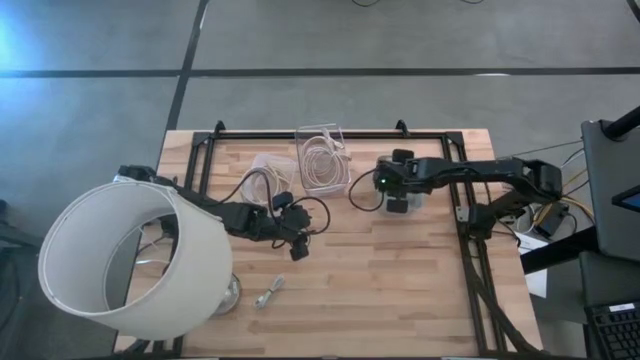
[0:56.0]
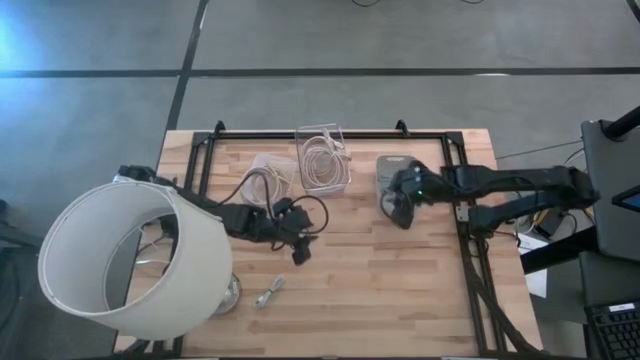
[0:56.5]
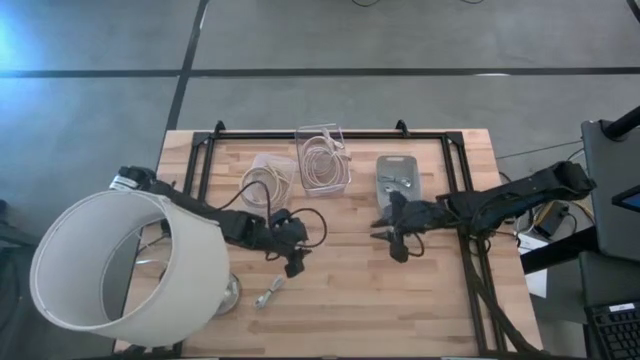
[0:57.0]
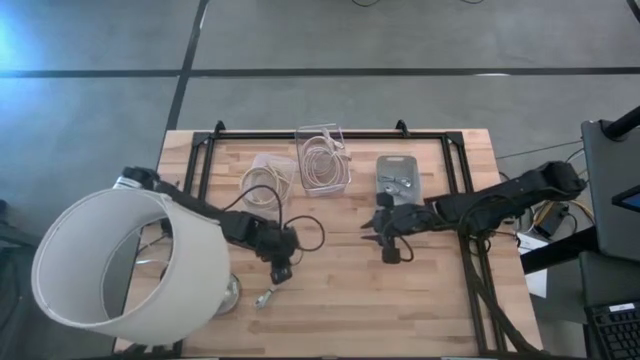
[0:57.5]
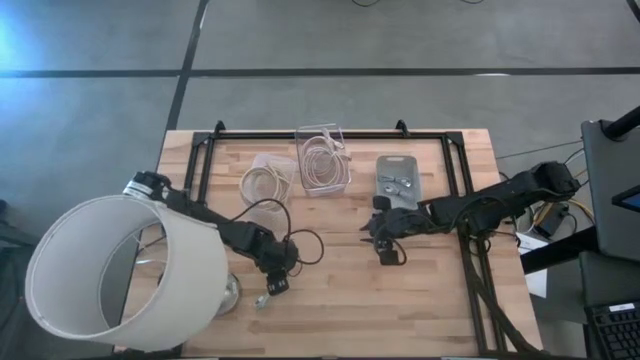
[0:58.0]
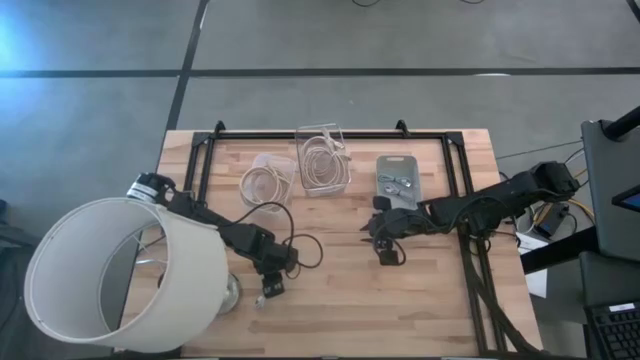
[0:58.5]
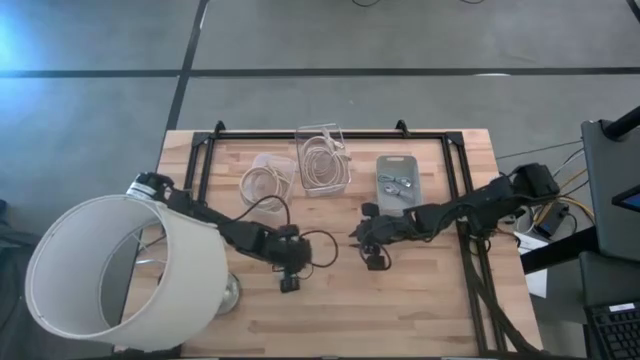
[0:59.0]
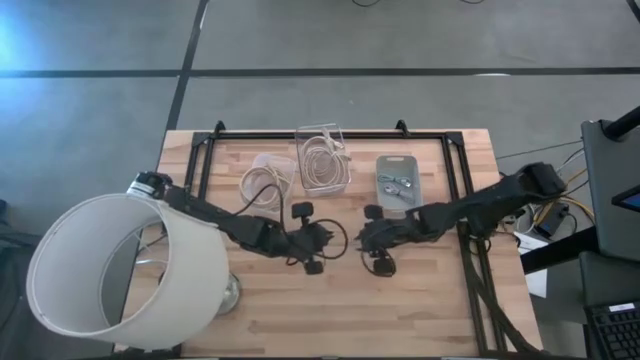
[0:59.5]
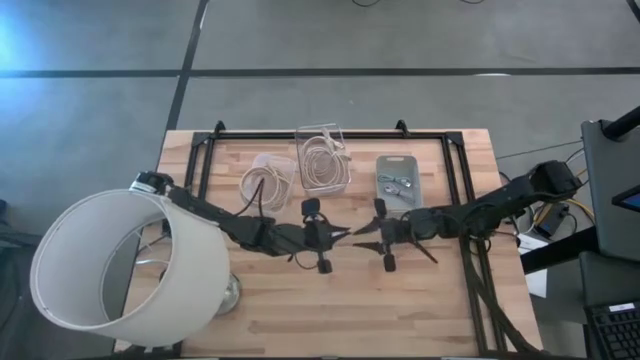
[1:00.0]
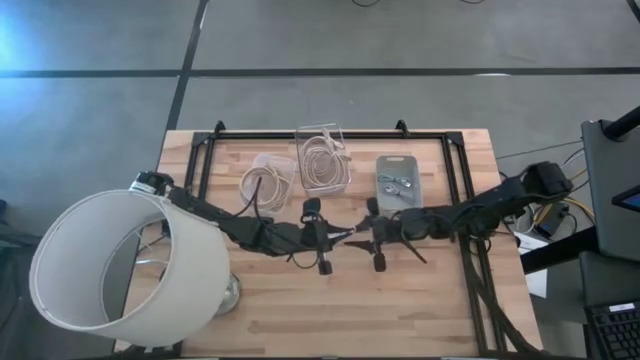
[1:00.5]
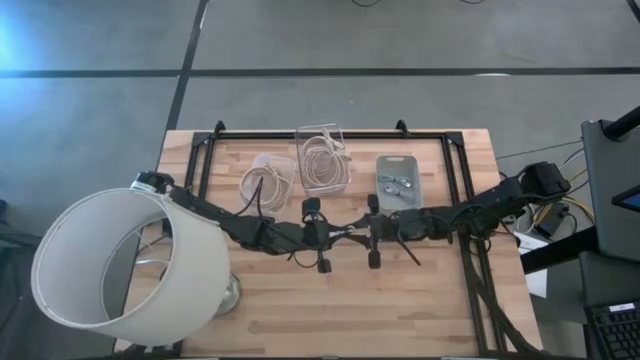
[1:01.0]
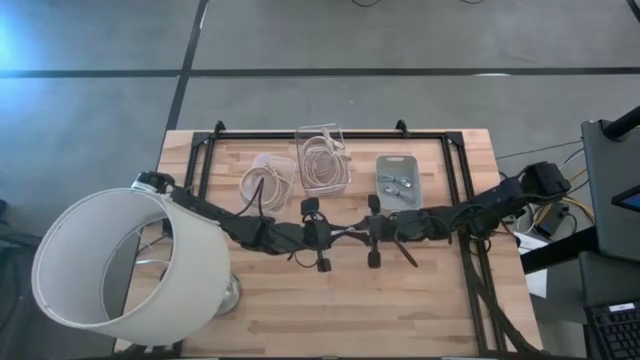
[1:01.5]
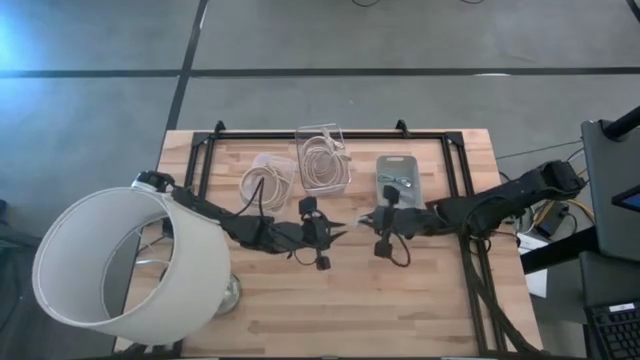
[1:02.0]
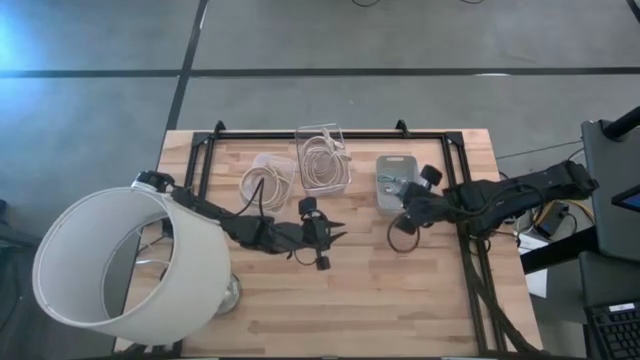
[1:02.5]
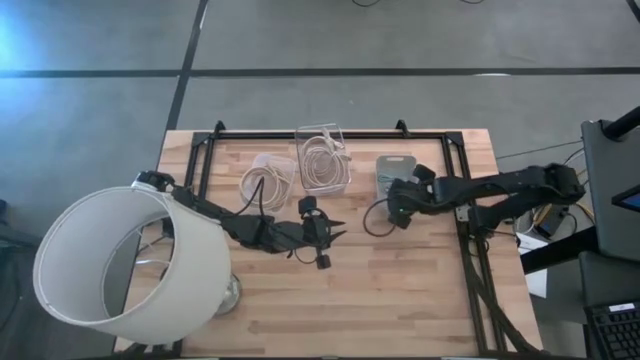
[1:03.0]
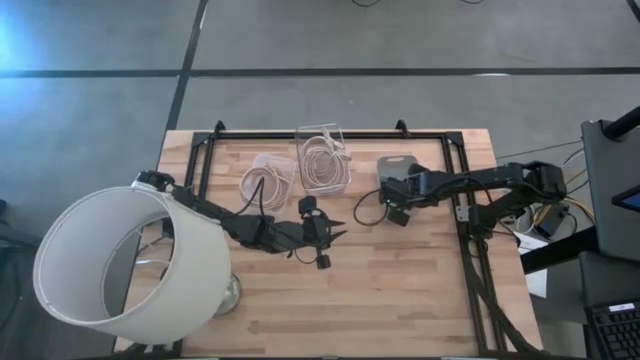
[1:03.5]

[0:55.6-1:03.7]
Task: Pick & Place USB Port
Put the white USB cable into the gray bin

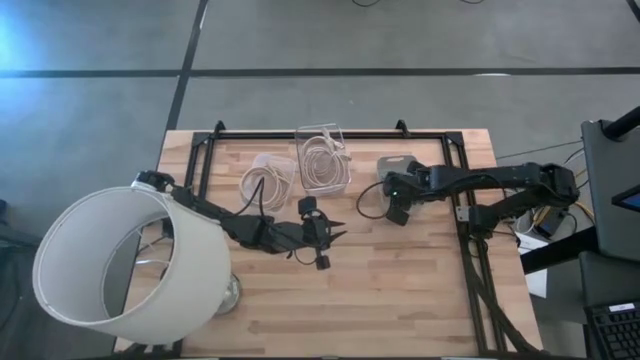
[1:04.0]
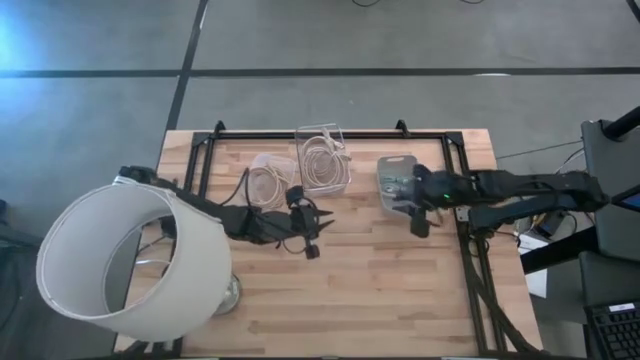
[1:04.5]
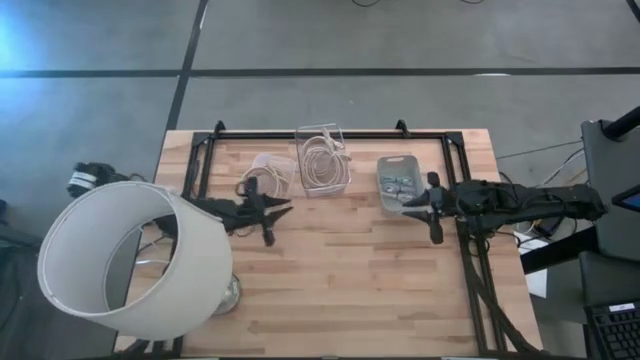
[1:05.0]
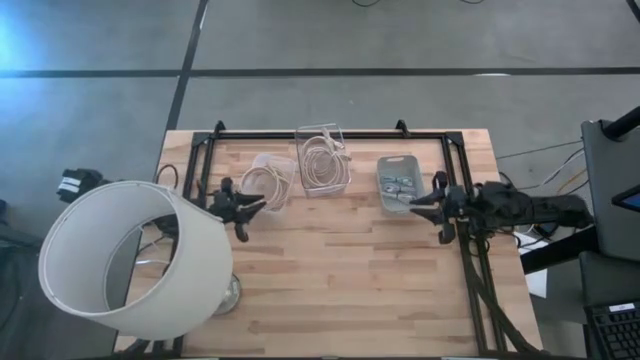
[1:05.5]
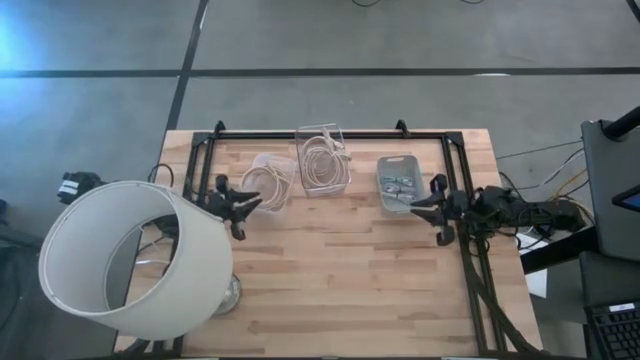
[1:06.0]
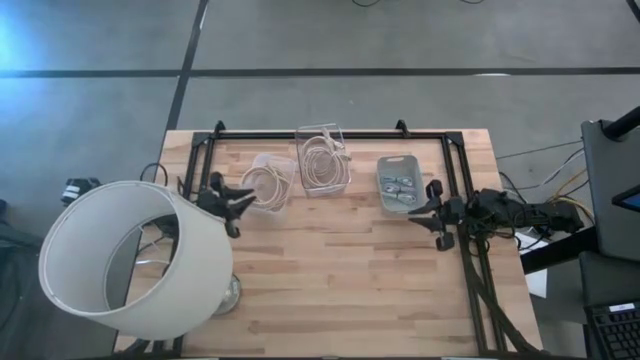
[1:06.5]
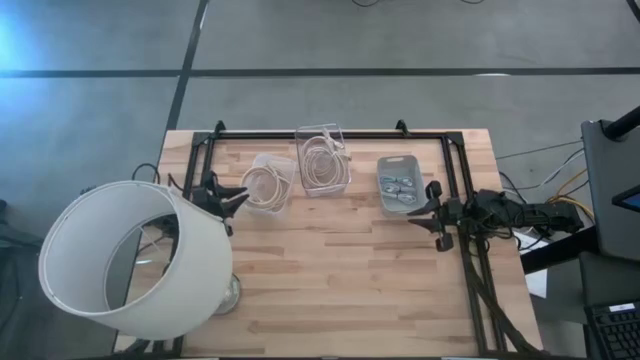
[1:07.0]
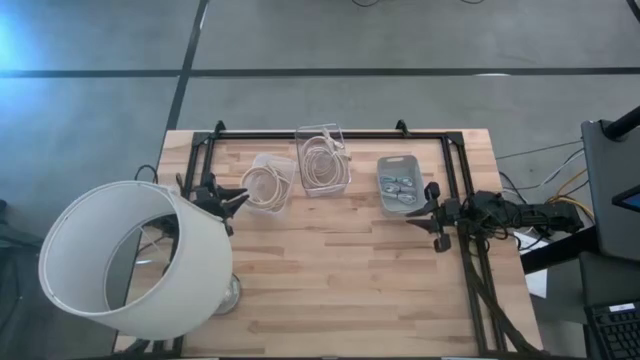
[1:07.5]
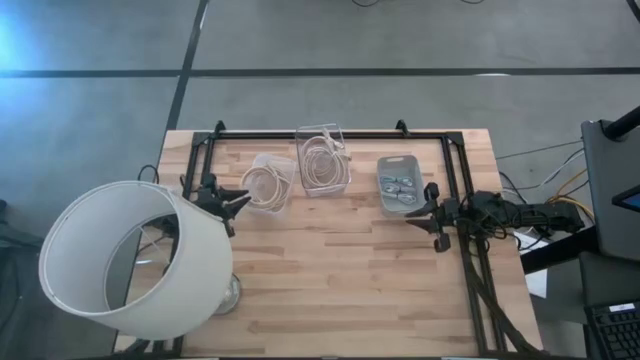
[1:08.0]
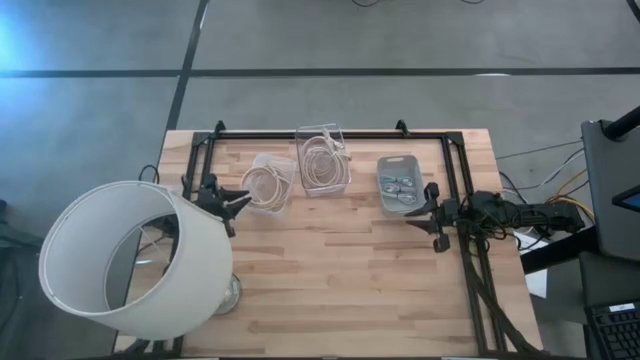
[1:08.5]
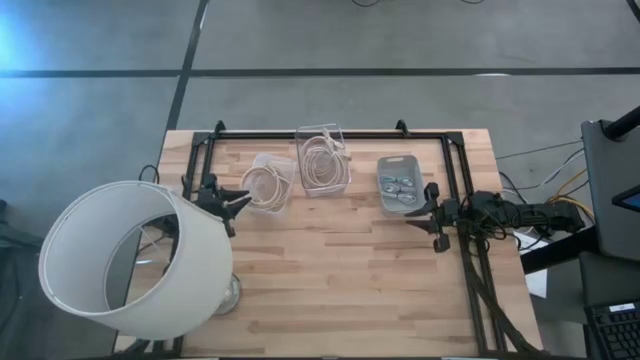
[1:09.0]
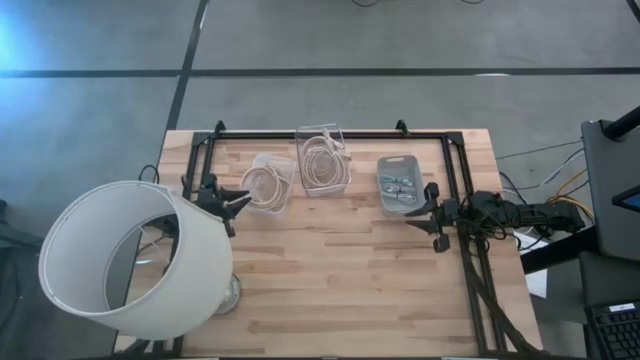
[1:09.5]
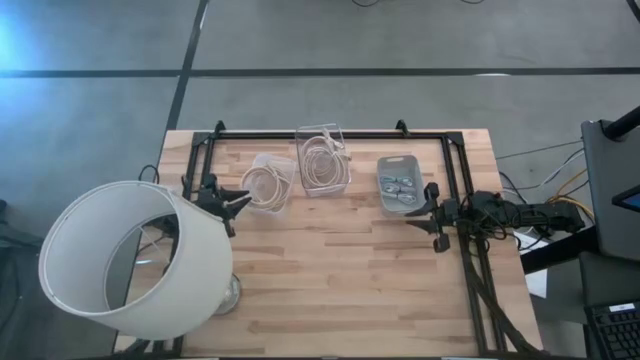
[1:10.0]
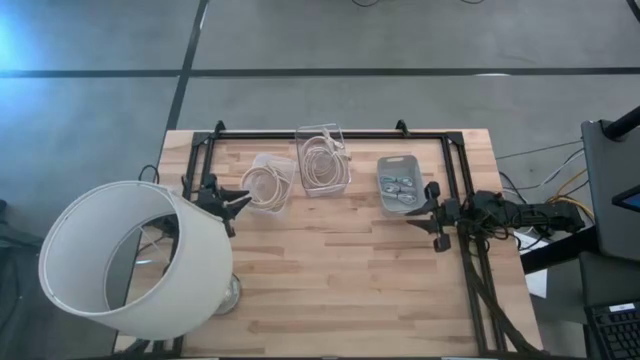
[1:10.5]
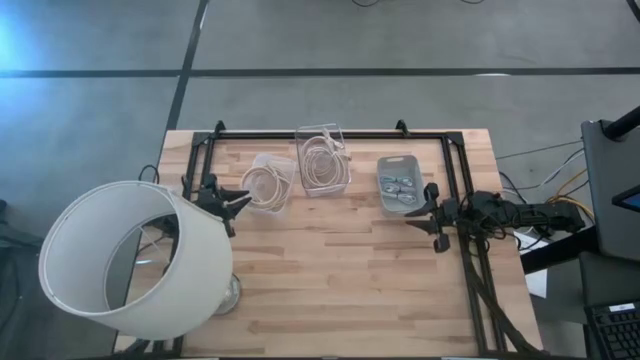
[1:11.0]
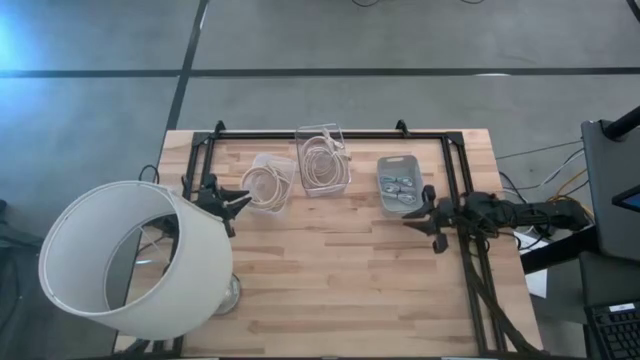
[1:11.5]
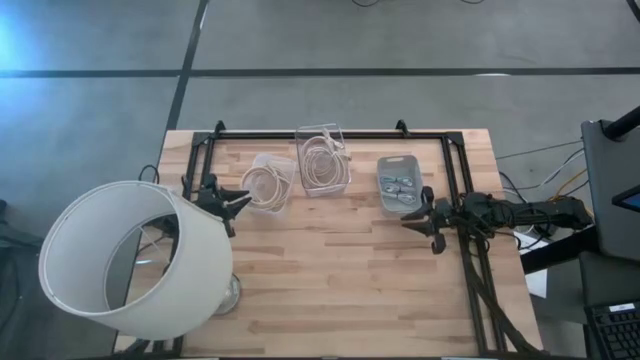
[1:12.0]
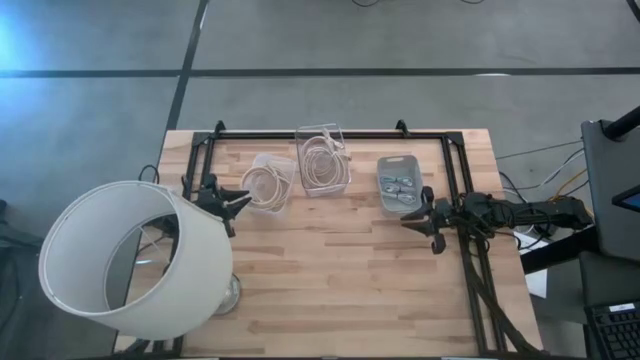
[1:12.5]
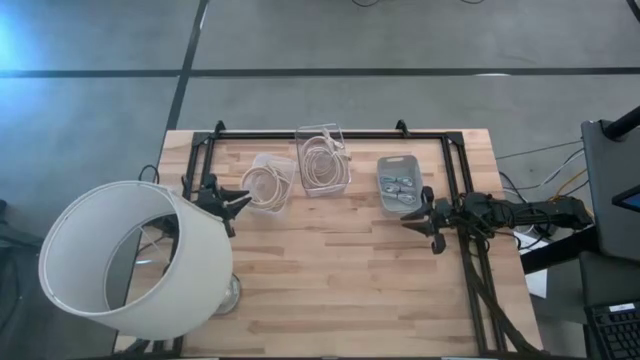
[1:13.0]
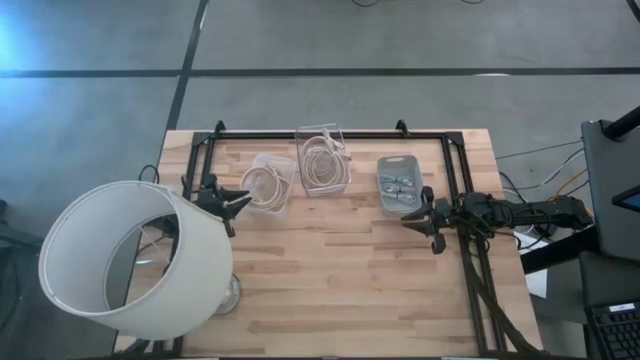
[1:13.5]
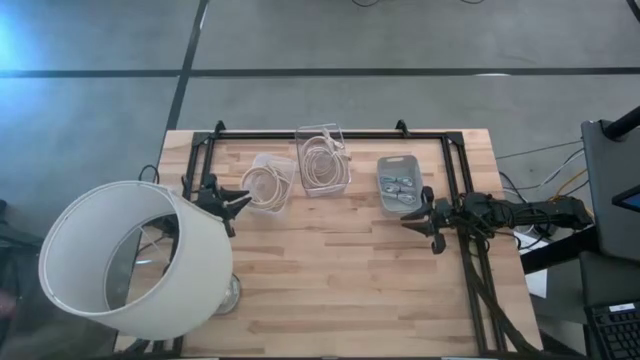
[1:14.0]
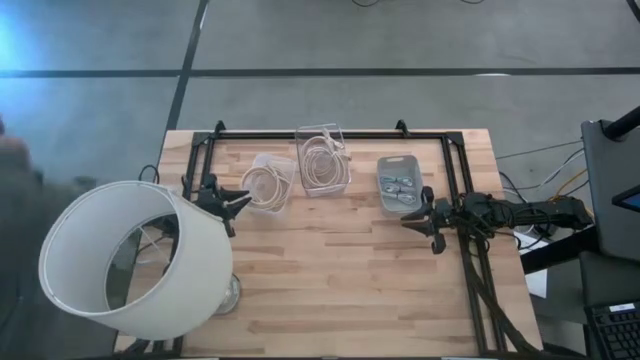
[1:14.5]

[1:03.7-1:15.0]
Return to Home Position

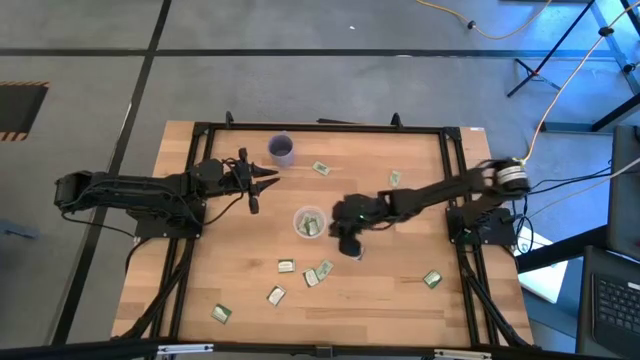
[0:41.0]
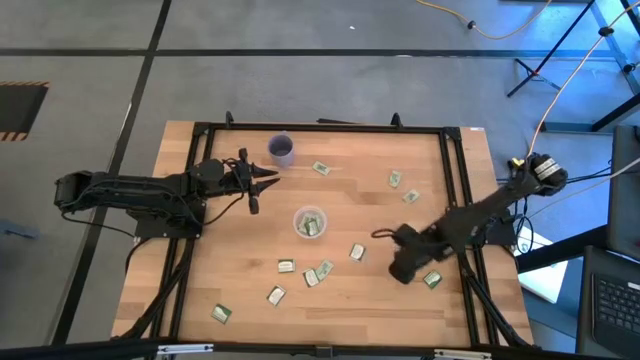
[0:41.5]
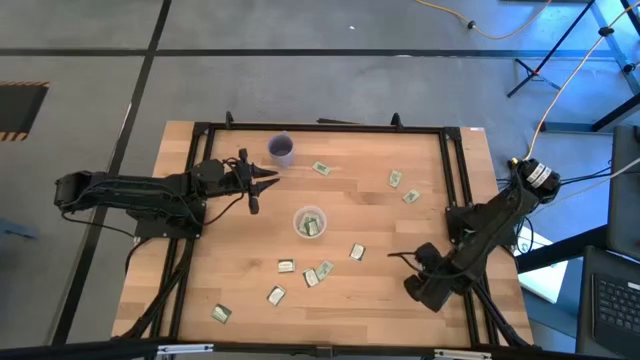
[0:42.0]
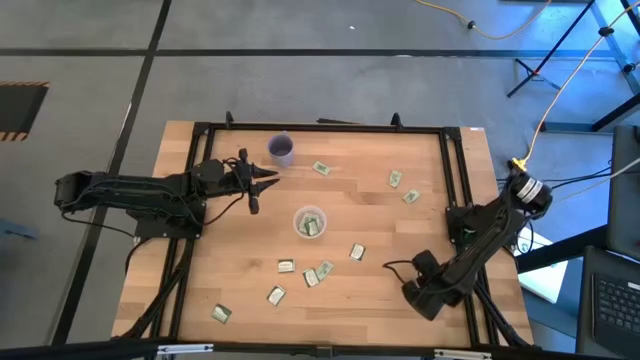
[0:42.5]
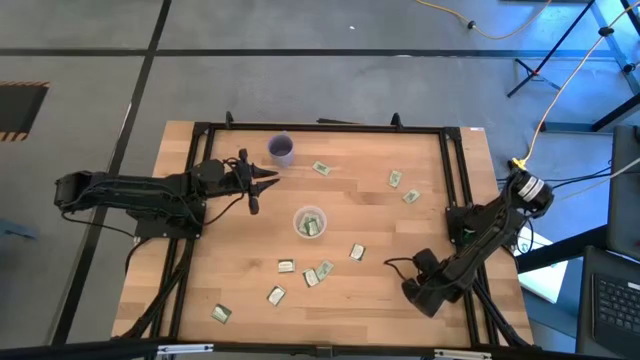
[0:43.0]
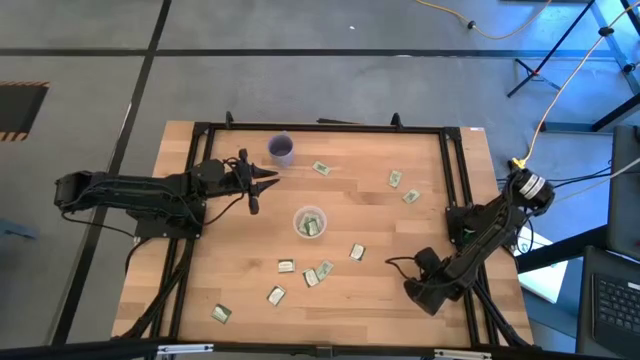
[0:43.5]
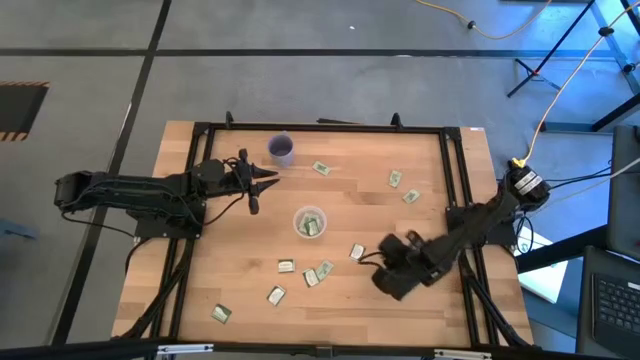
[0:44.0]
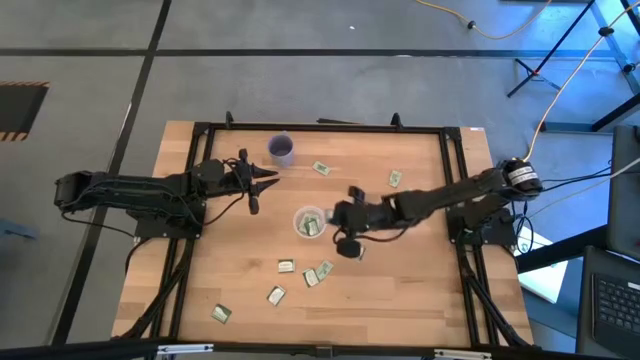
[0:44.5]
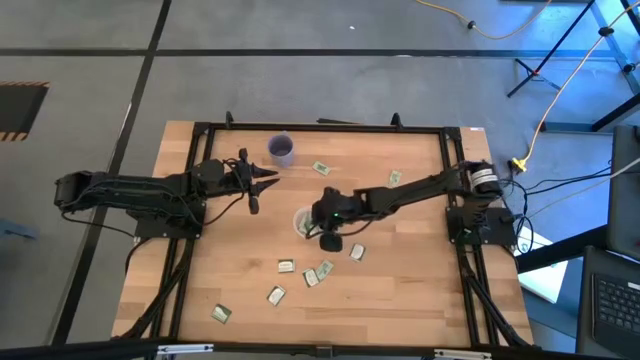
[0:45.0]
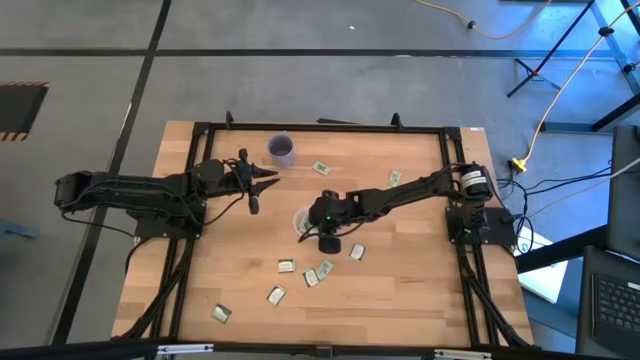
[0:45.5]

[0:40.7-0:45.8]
Task: Pick and place Stevia / Truvia into bins
Put the truvia packet into the transparent container
